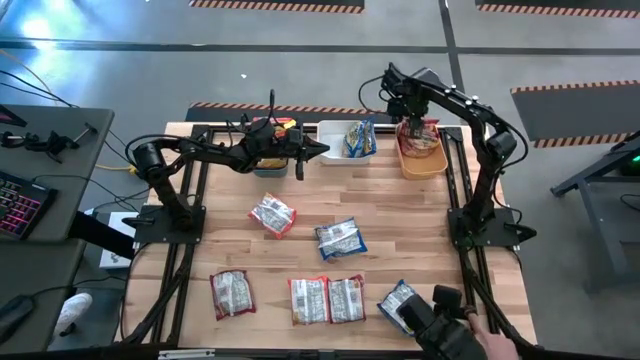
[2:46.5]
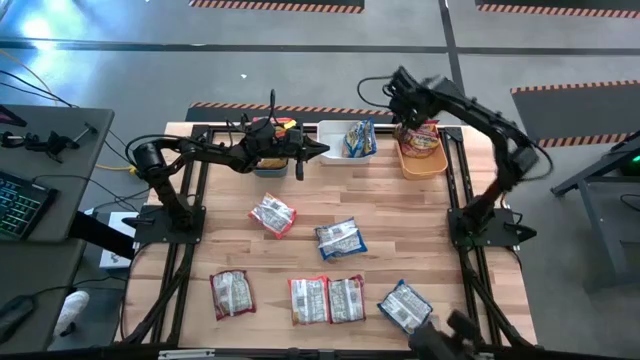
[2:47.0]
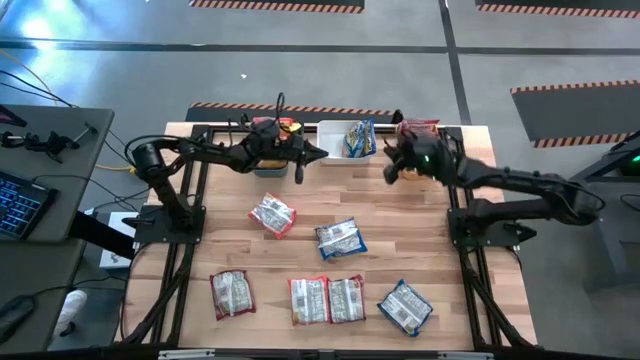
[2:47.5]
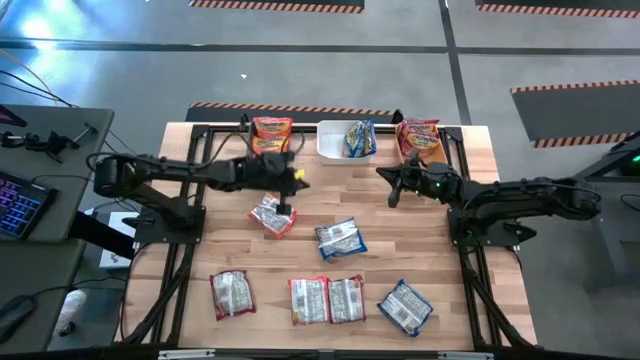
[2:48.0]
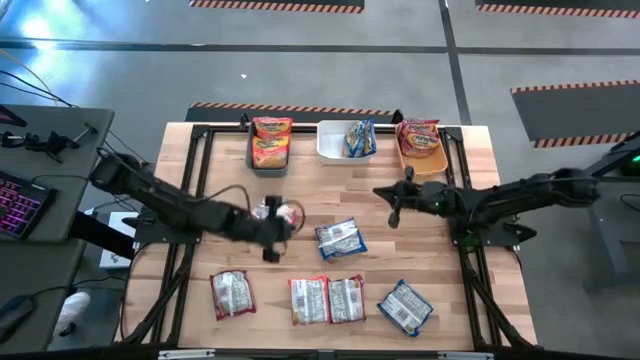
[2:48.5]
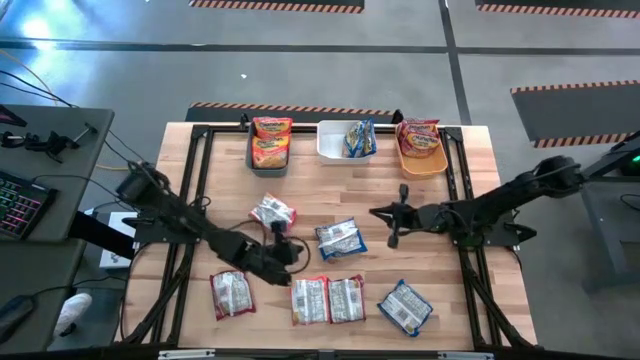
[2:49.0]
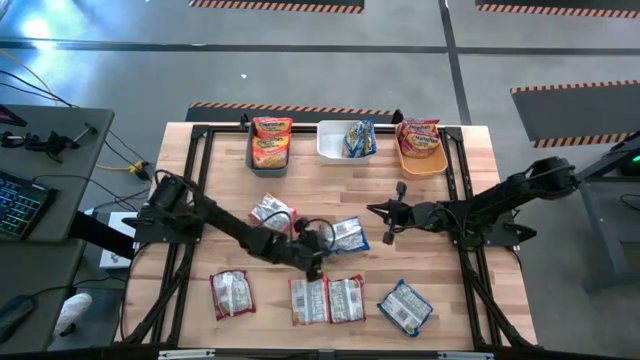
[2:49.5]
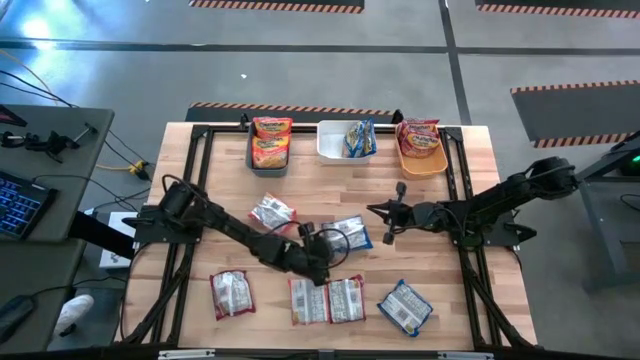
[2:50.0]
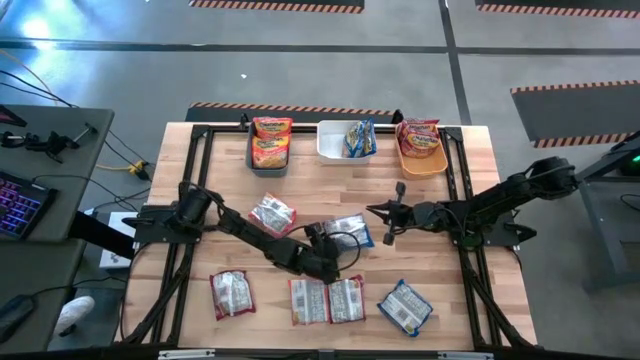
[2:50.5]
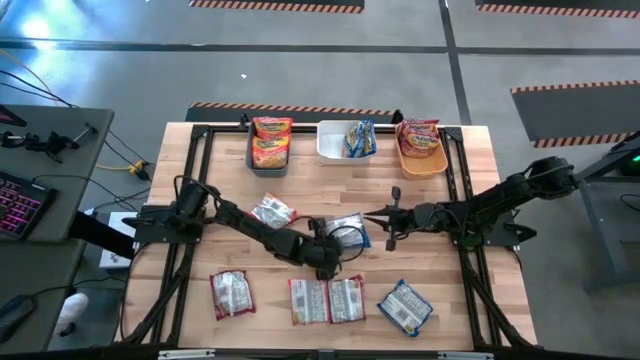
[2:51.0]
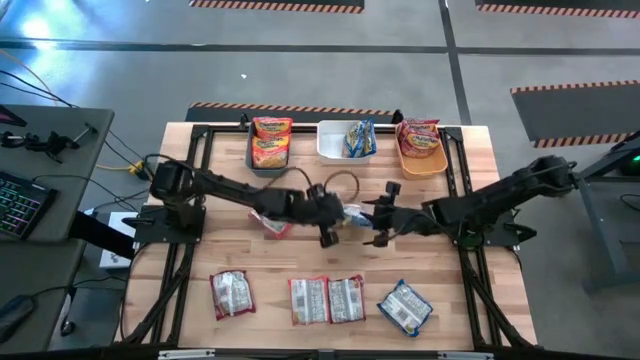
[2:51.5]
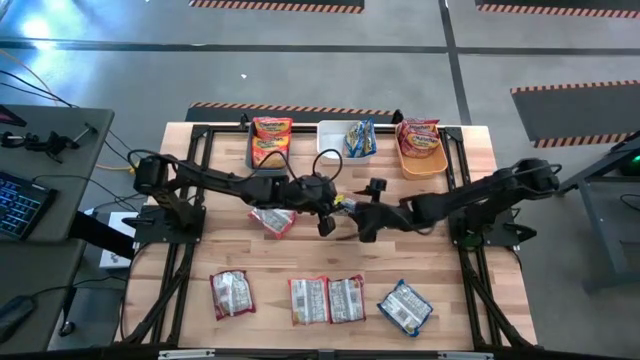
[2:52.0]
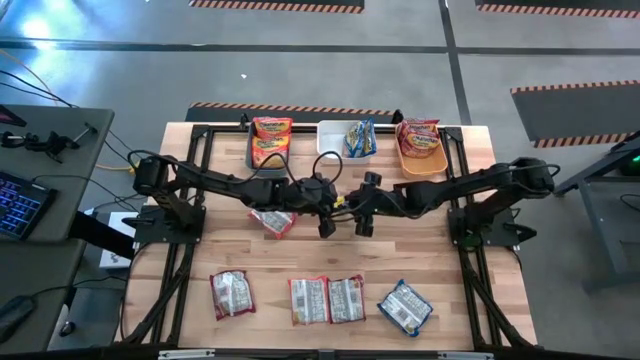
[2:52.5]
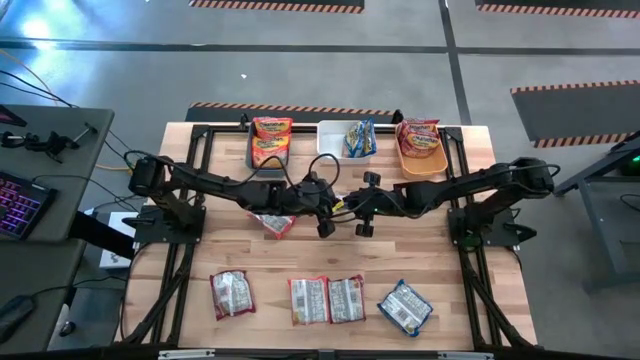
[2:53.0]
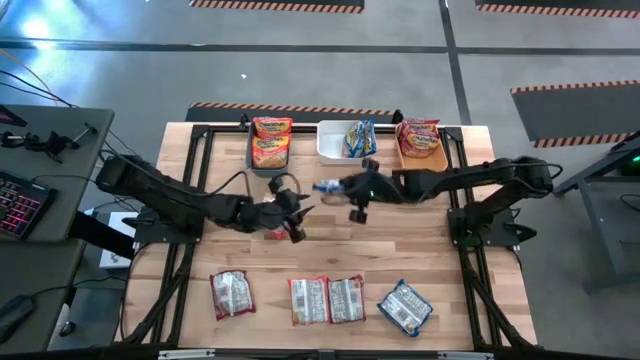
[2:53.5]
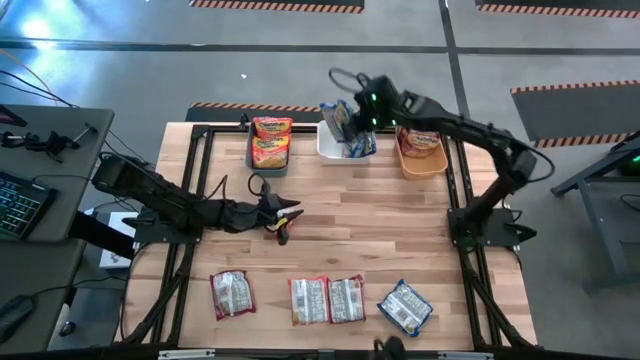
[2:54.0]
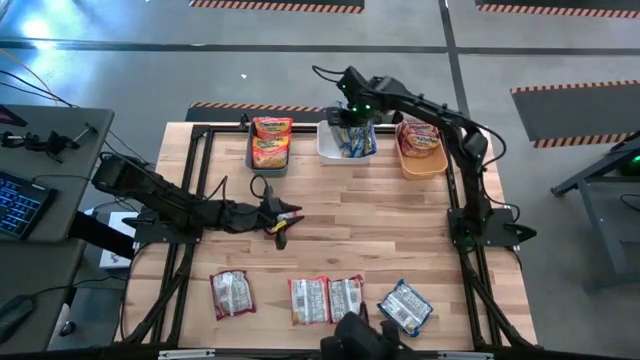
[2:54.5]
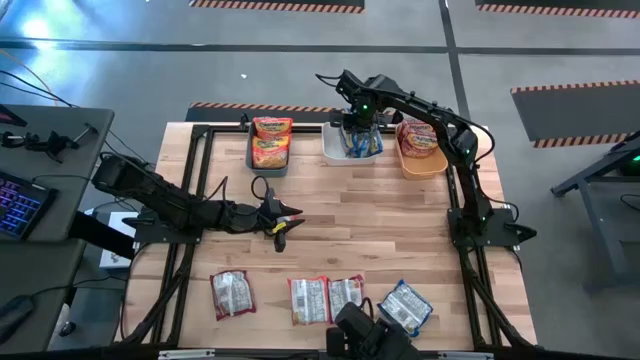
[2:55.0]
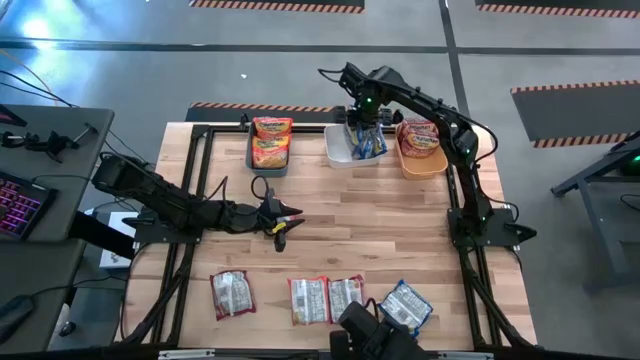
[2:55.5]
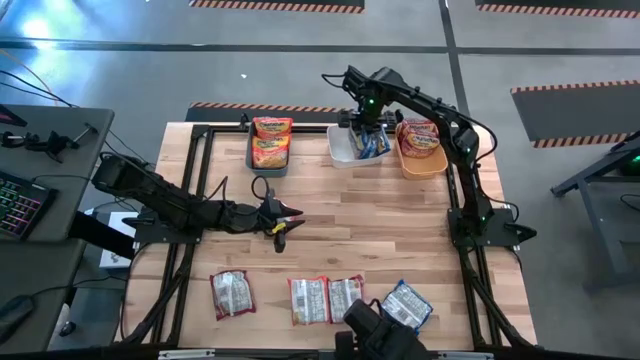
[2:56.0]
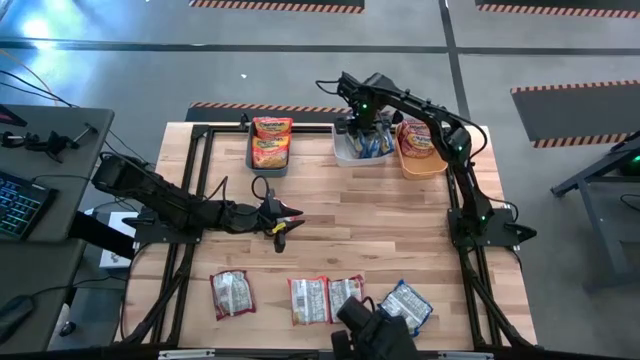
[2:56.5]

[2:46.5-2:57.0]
Task: Sort Maruchan noodles
Put the top blue noodle pack into the white bin

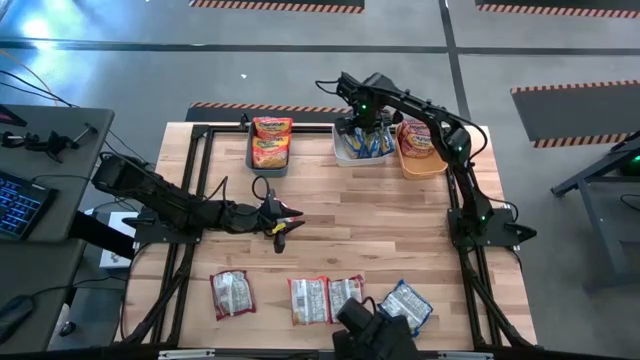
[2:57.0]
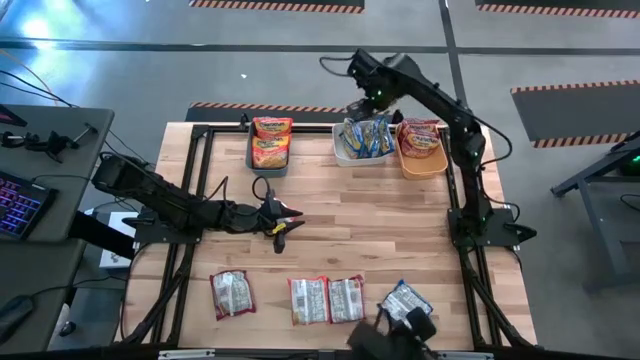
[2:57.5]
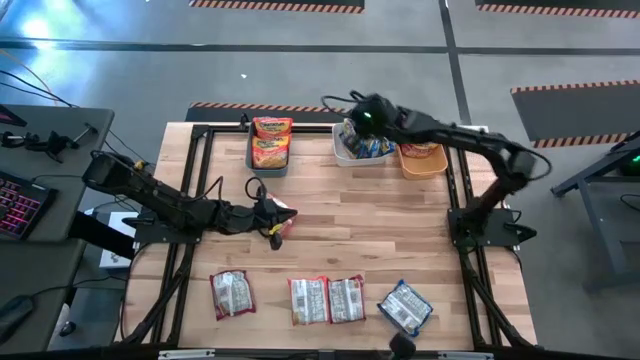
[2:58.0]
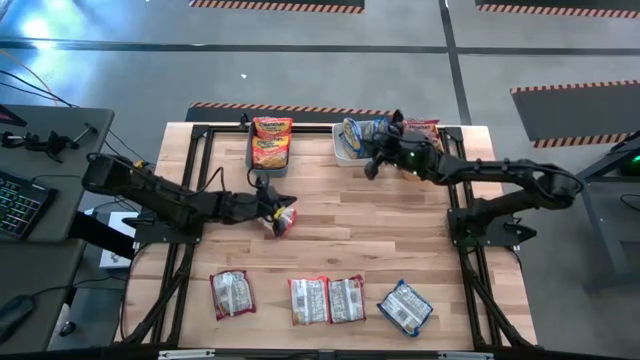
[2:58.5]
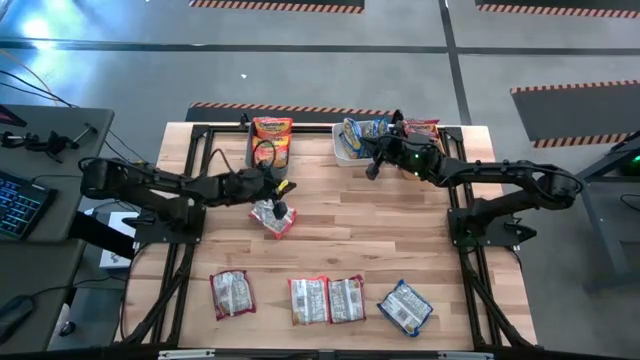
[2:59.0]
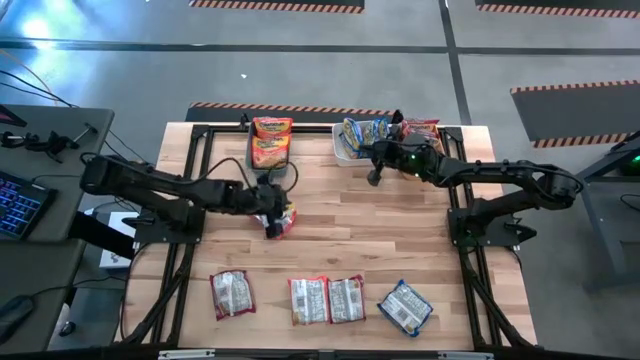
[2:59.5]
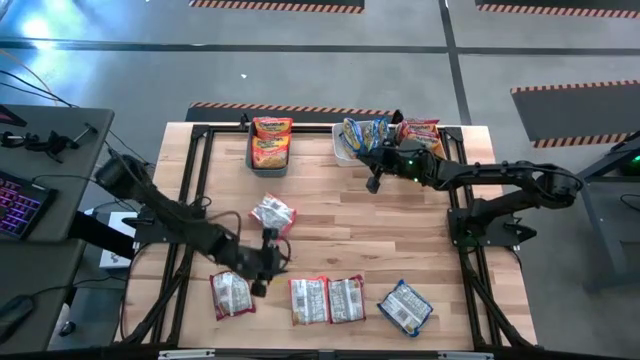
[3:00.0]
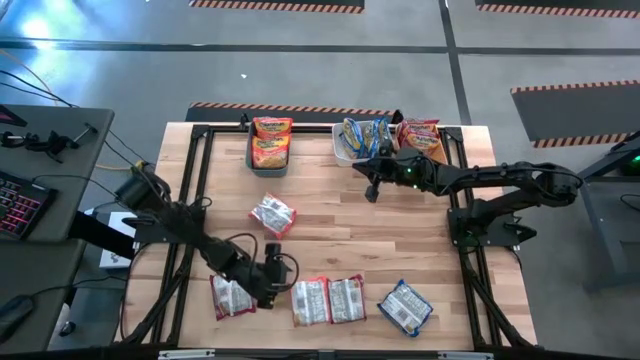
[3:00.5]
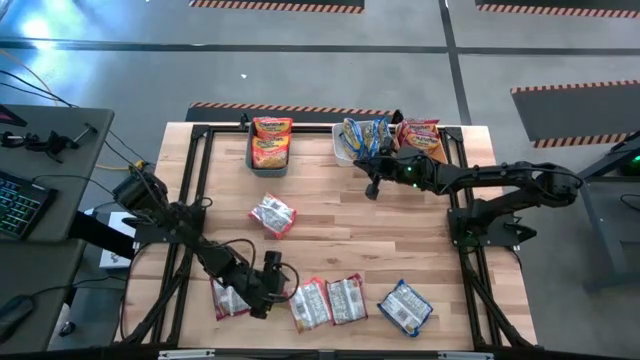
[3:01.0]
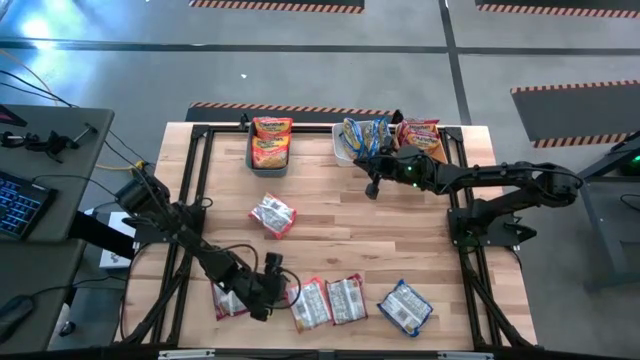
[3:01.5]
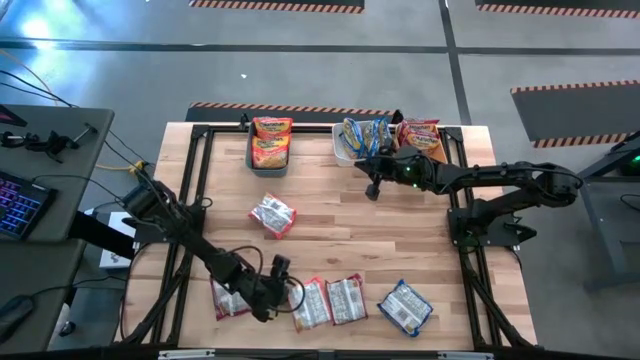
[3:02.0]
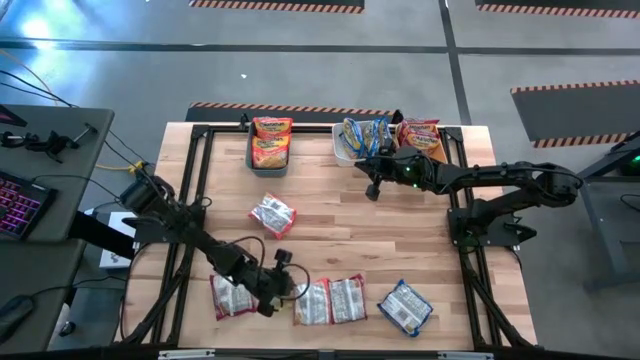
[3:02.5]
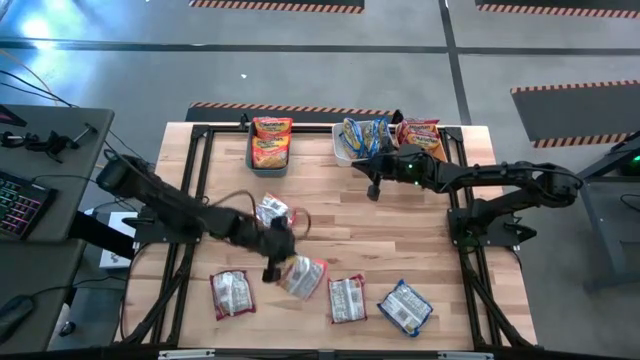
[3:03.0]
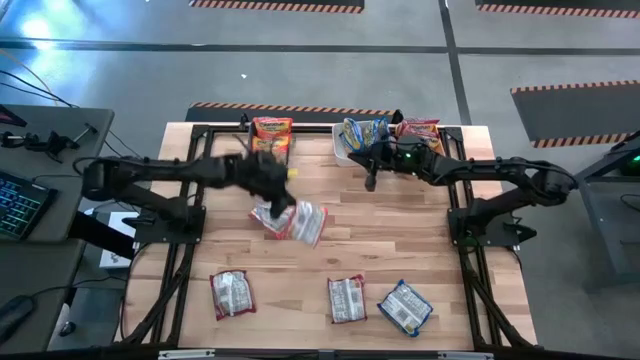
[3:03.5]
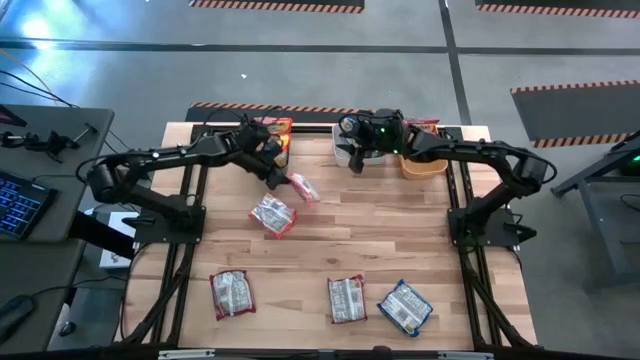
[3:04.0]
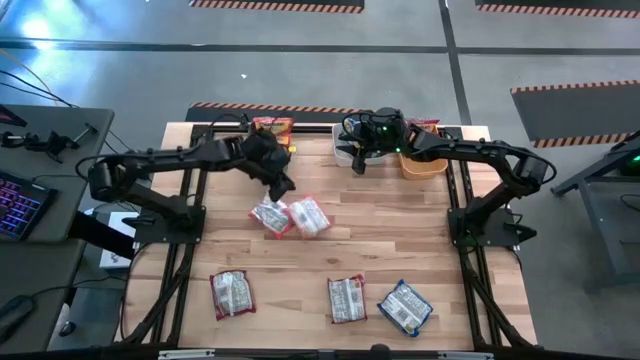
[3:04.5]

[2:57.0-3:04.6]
Move the bottom orange noodle pack to the center of the table

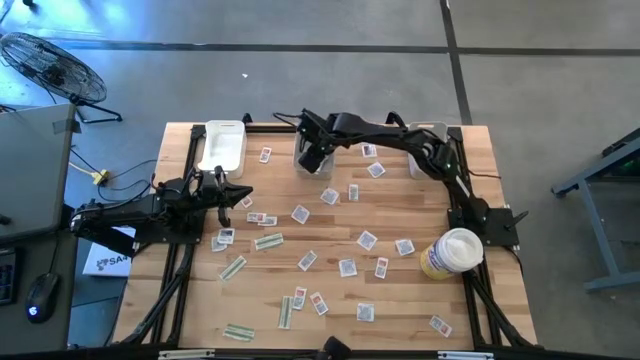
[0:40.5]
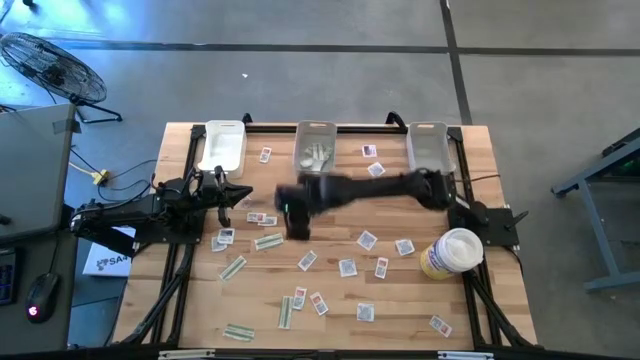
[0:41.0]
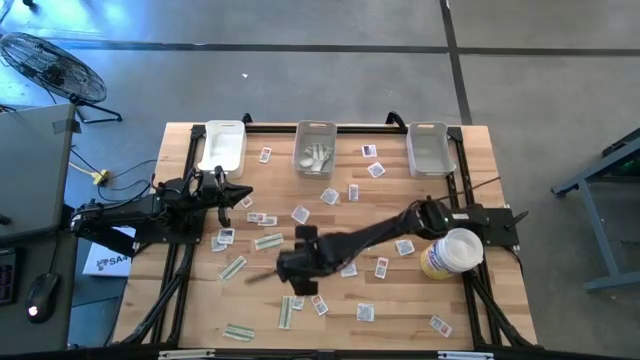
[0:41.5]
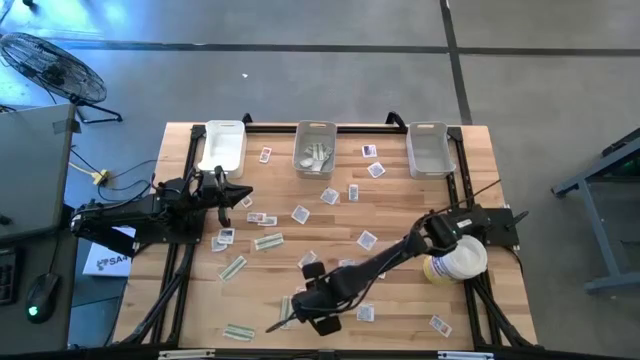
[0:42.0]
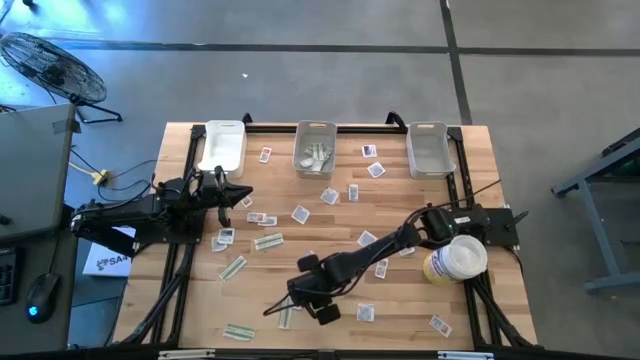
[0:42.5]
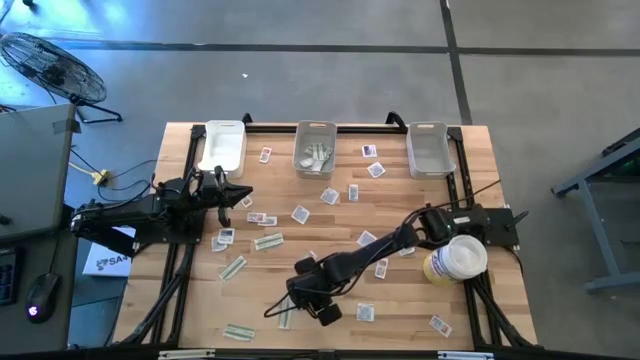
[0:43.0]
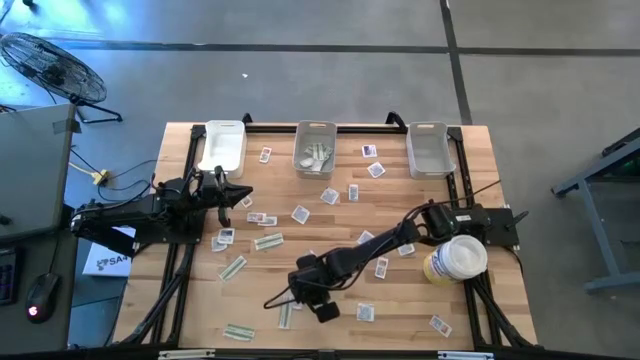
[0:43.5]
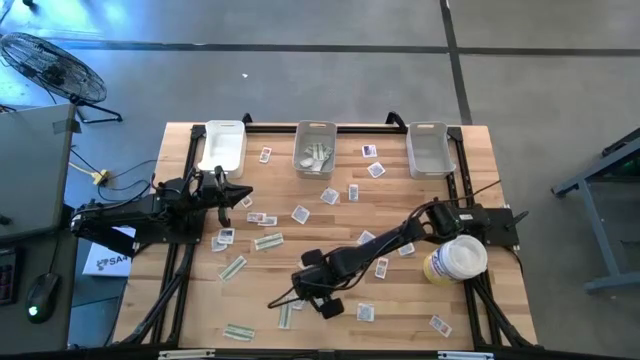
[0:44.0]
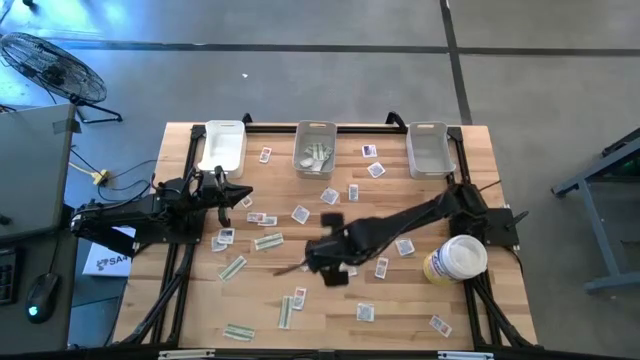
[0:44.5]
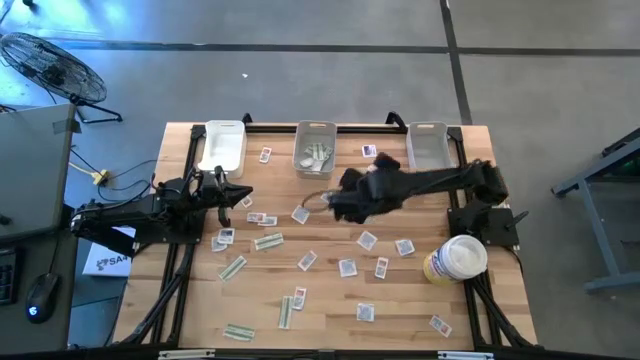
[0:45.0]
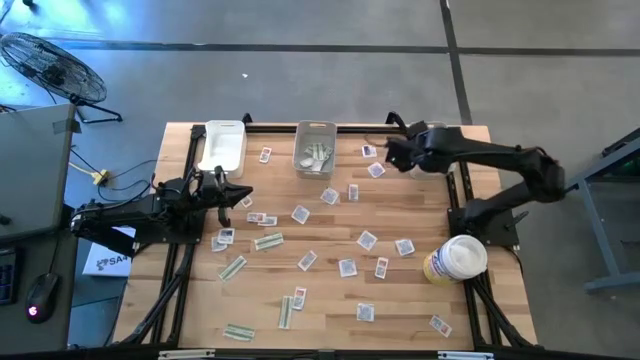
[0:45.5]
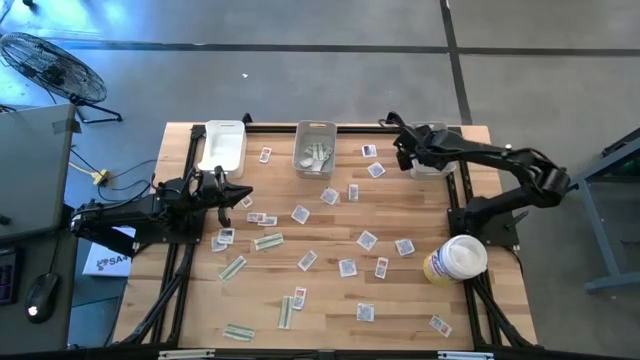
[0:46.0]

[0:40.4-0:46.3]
Task: Pick & Place First Aid Supplies
Put the orange pad into the right gray bin
